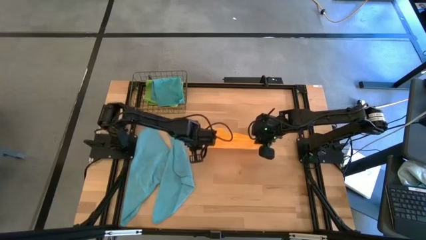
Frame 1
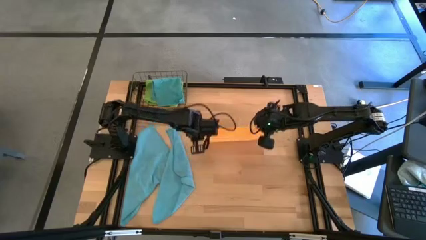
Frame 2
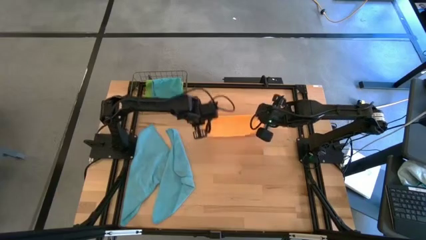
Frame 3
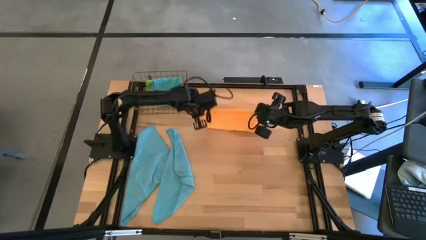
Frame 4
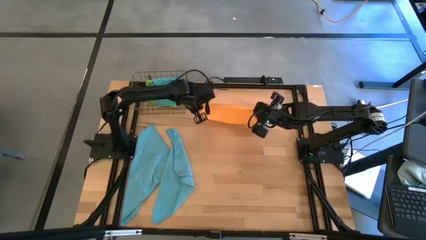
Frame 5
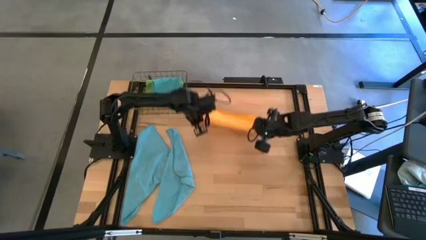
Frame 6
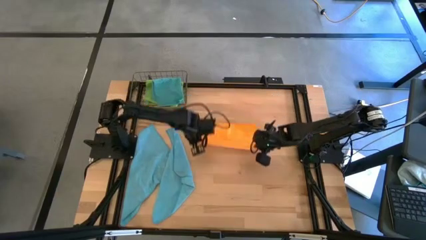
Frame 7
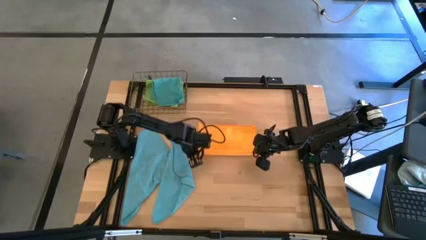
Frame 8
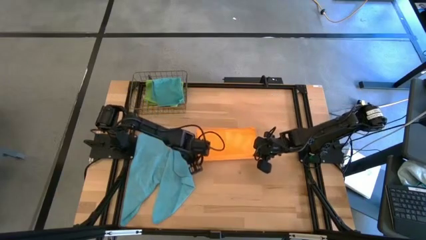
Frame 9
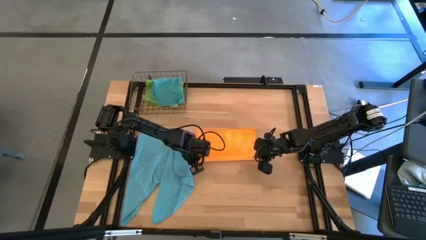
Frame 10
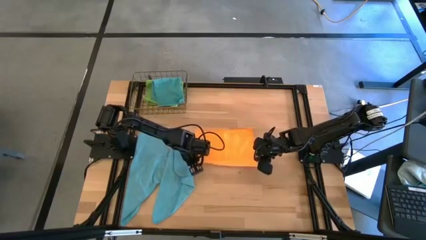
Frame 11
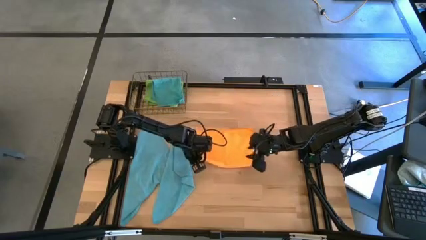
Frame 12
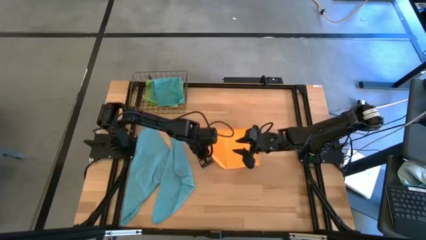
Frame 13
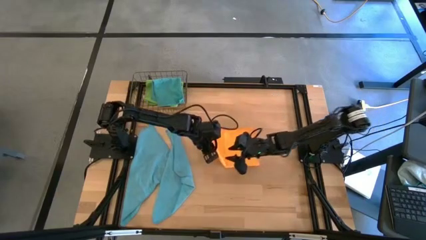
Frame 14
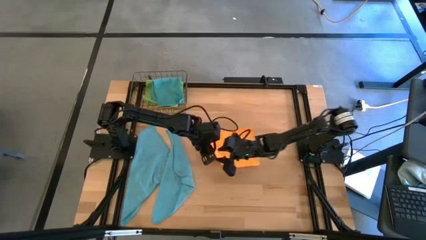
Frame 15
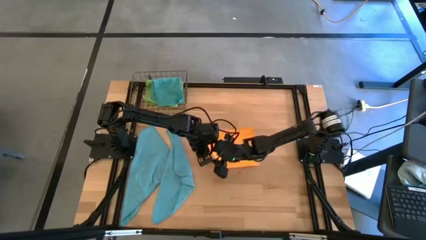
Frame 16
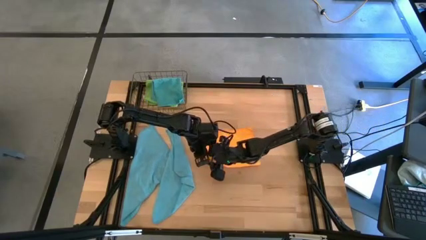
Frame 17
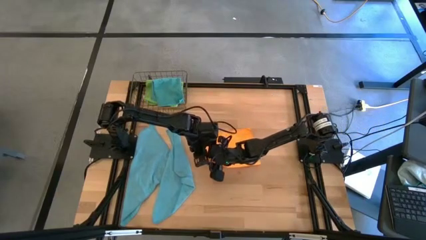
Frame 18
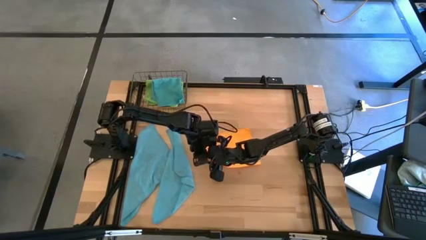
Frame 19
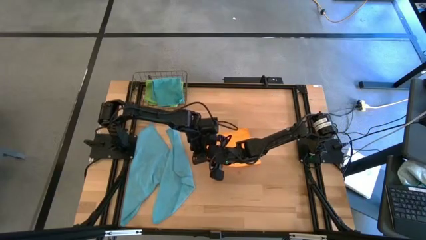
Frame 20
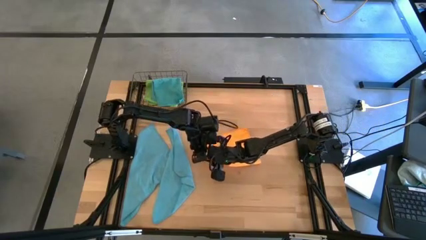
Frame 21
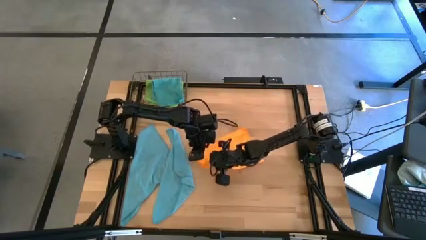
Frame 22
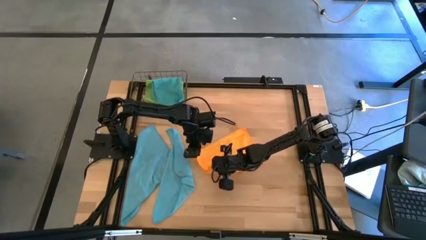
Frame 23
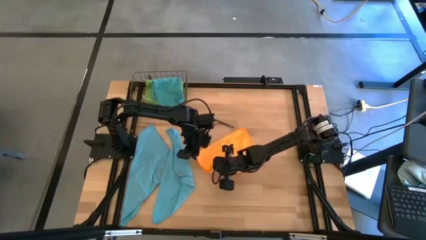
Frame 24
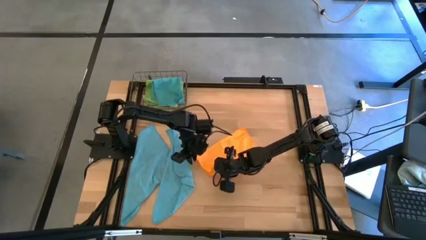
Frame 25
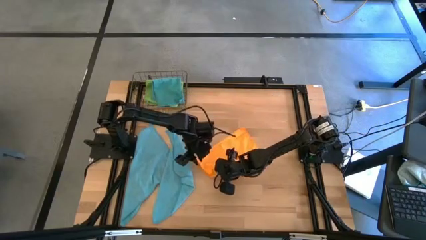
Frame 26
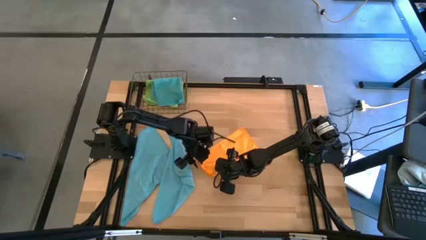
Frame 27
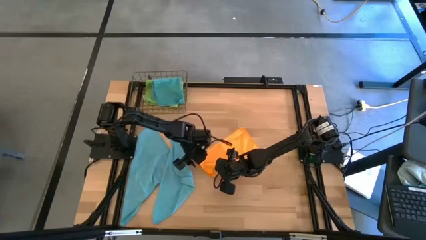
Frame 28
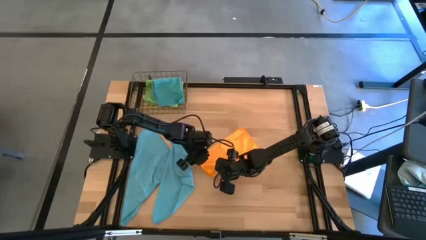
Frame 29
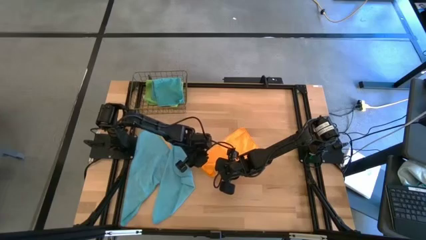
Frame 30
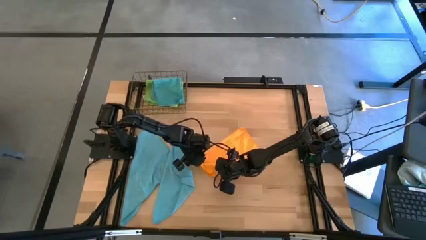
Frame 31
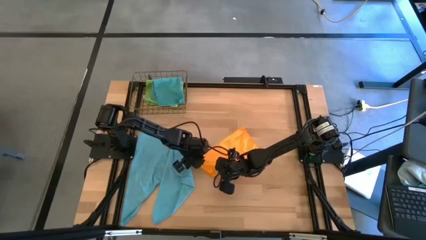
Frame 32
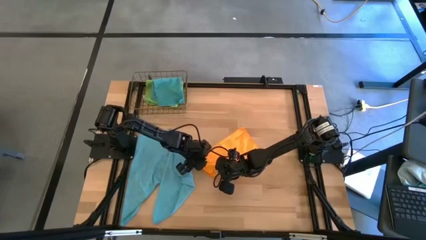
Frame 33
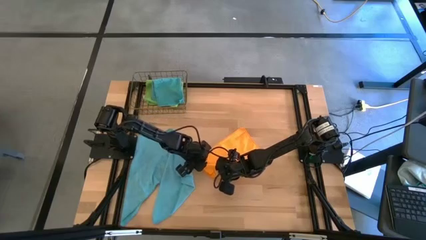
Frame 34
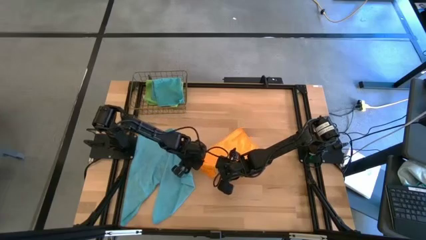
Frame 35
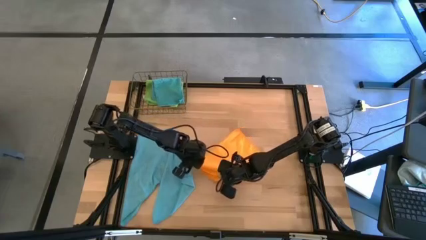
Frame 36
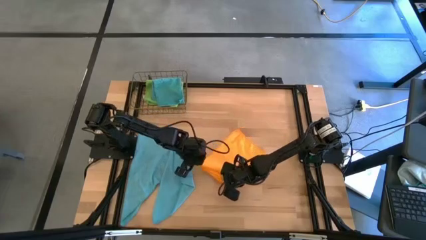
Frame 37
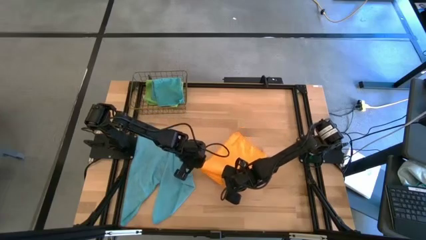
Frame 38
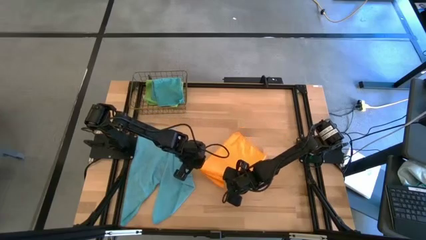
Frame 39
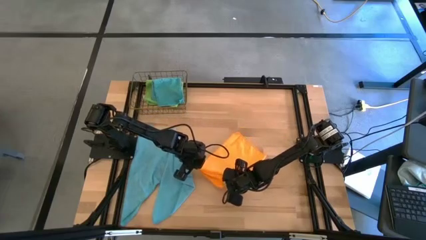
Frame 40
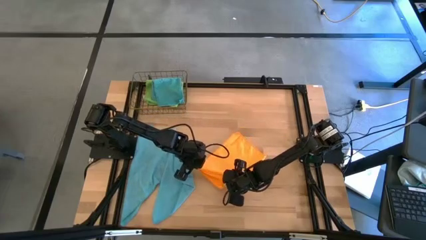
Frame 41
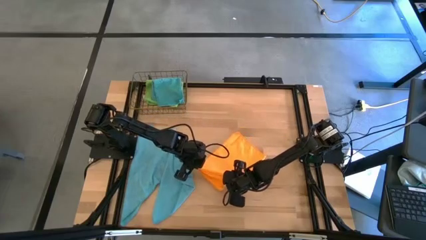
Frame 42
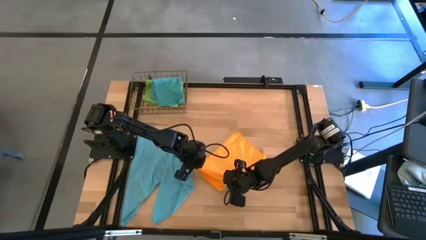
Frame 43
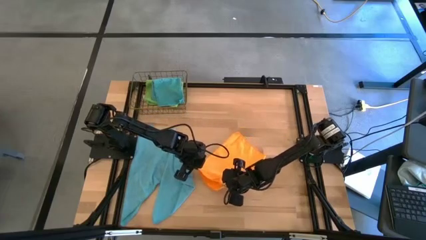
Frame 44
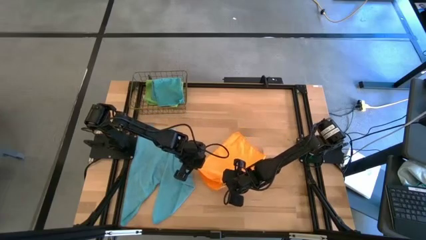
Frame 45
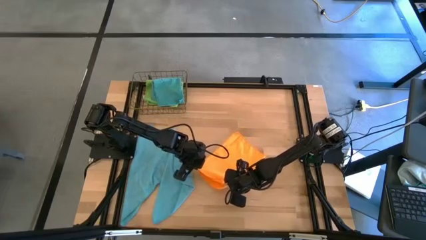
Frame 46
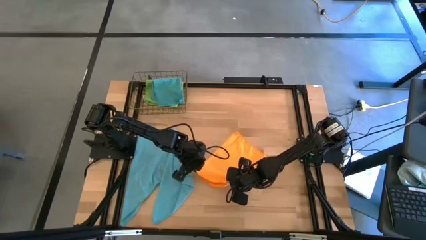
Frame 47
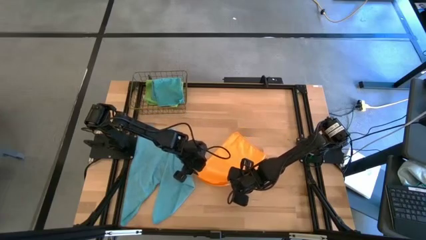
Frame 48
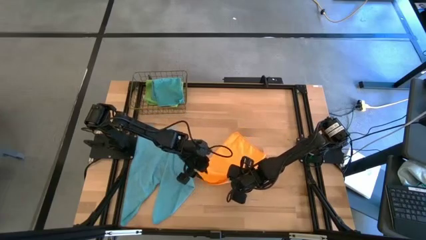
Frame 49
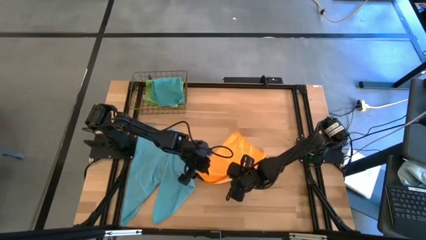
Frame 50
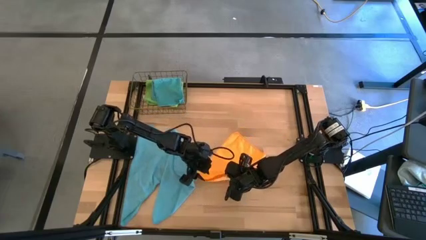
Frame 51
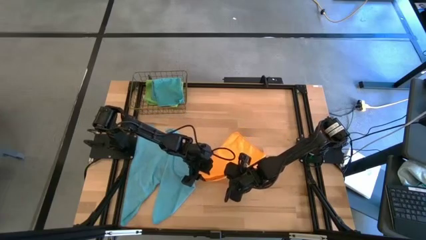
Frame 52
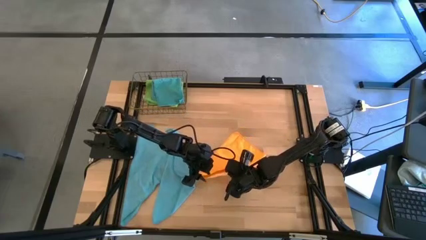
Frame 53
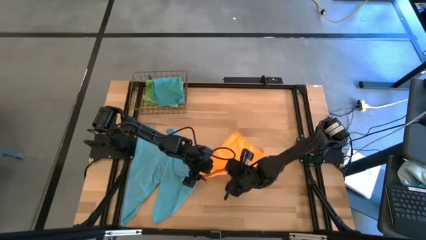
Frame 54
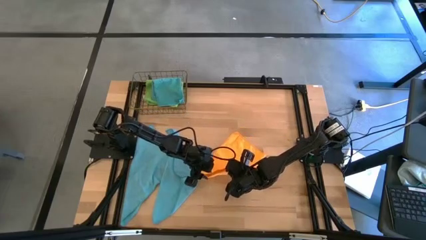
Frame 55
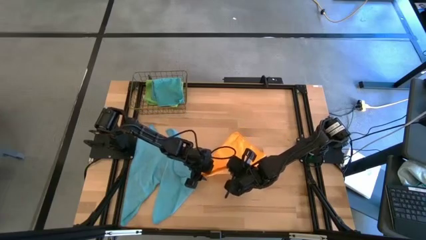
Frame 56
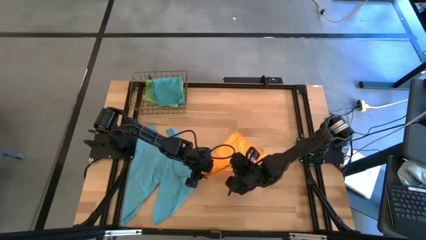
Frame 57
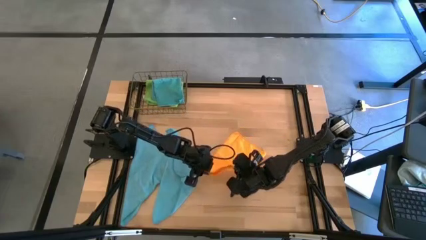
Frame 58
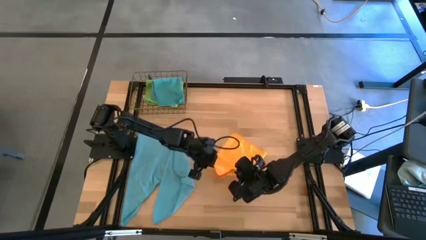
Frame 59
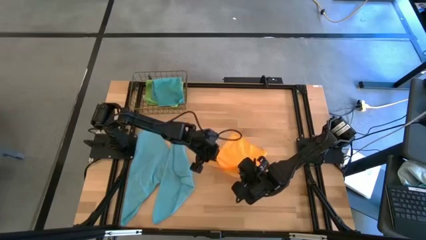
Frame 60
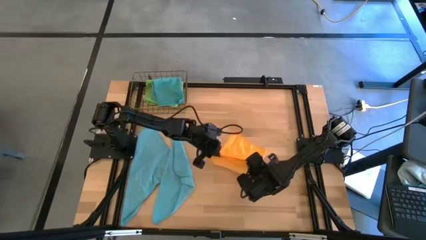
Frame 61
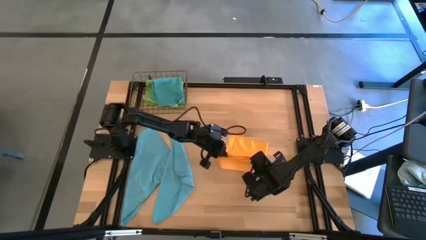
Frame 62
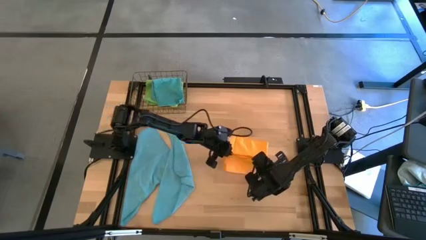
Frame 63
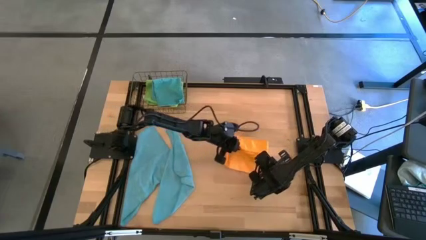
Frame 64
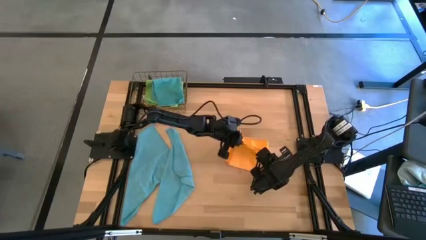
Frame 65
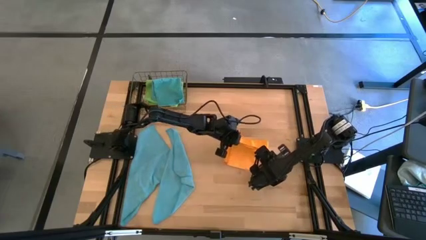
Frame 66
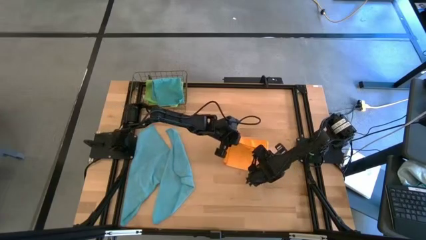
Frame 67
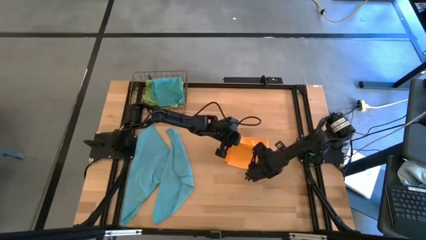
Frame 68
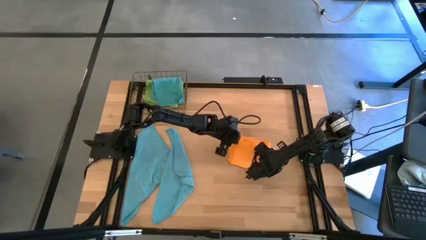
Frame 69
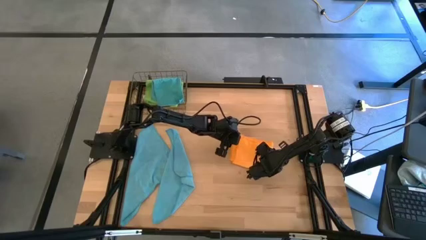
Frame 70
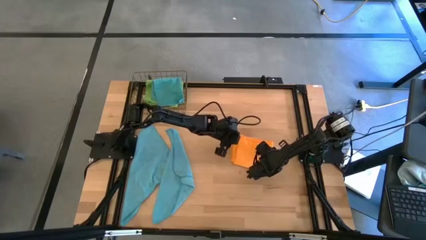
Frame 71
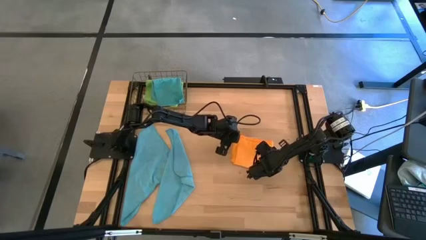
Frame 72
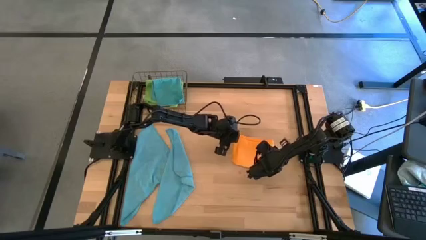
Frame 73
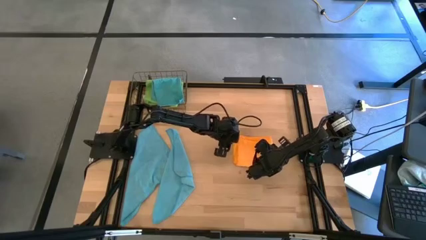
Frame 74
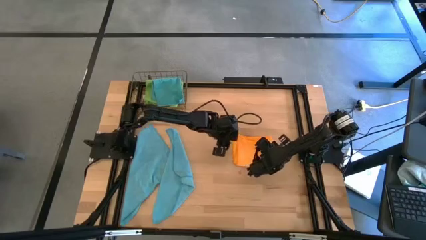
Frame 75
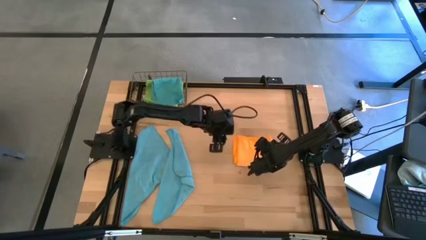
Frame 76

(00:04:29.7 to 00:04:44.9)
Task: Fold microfiber towels
Fold the orange microfiber cloth
